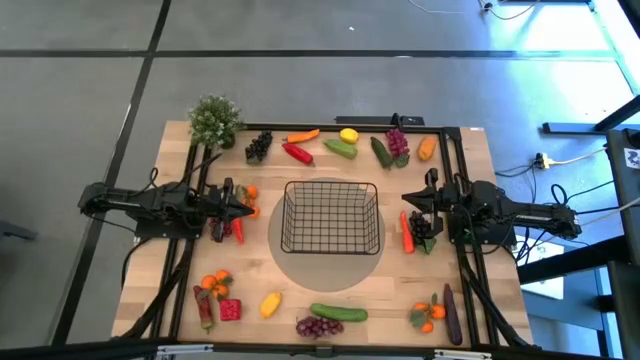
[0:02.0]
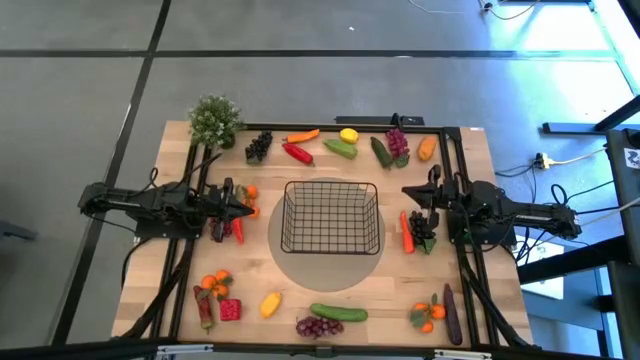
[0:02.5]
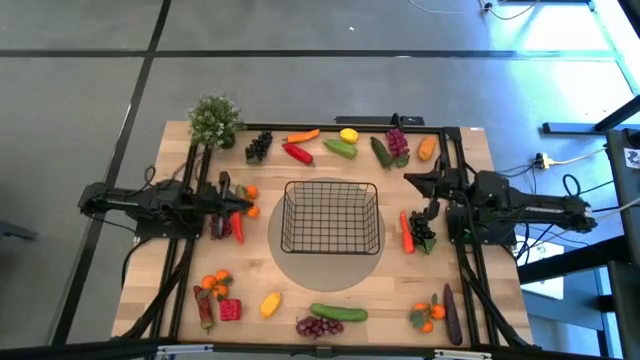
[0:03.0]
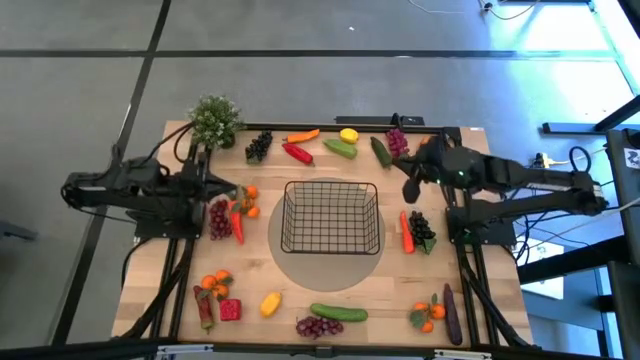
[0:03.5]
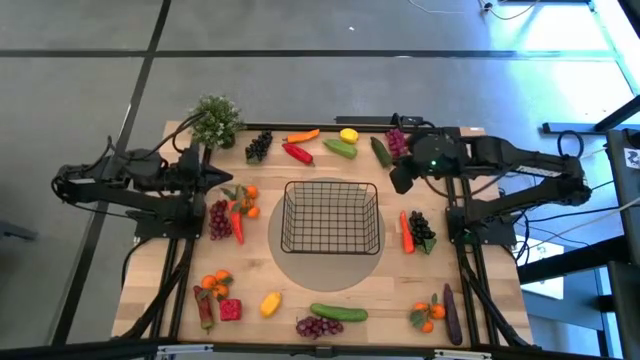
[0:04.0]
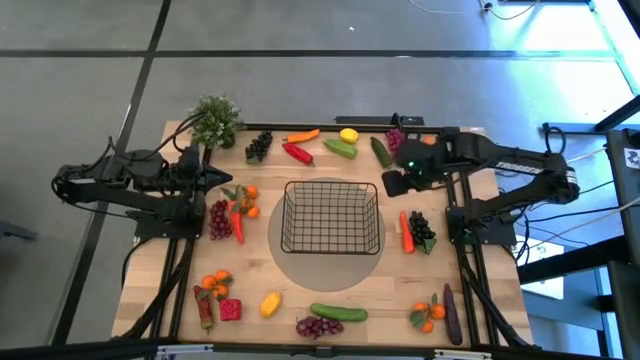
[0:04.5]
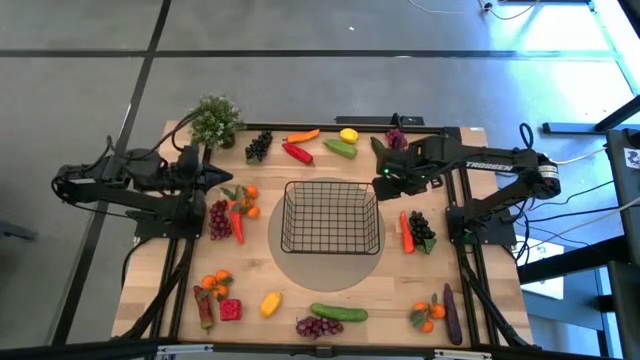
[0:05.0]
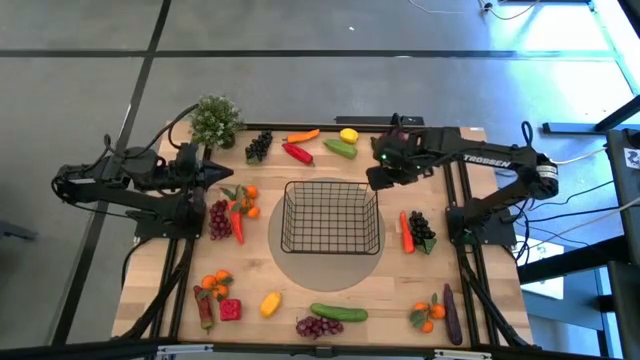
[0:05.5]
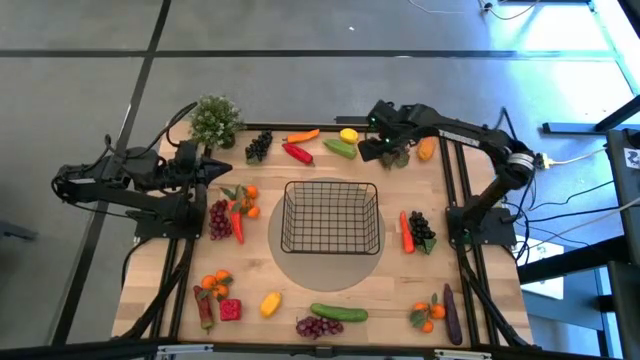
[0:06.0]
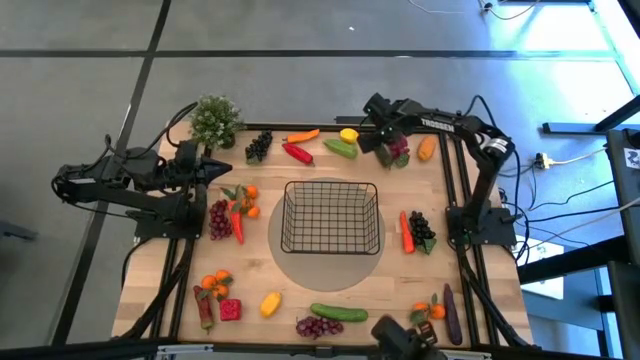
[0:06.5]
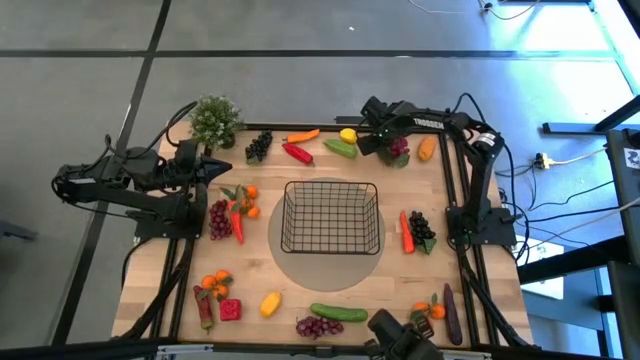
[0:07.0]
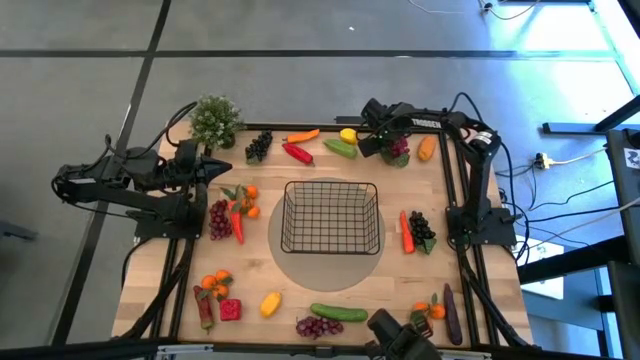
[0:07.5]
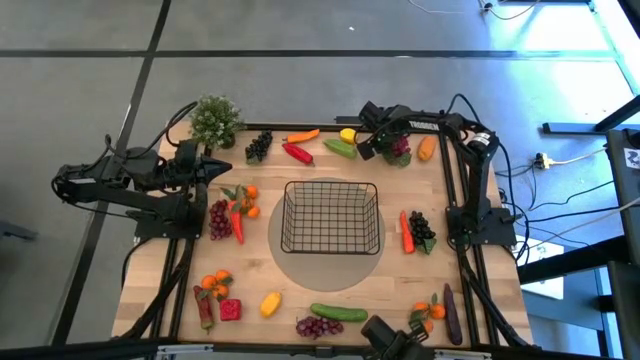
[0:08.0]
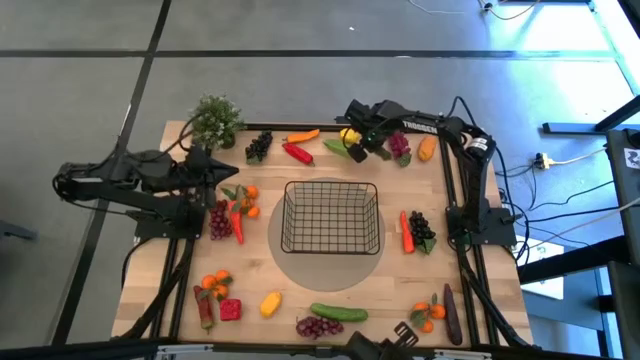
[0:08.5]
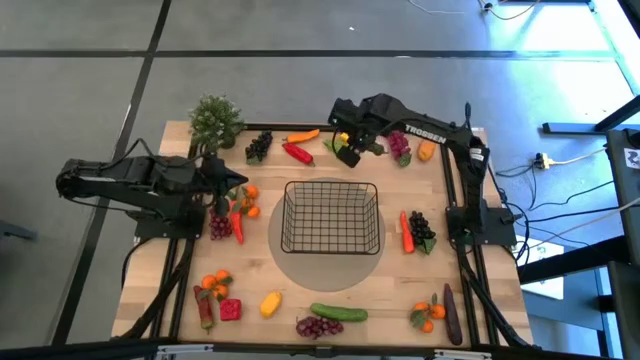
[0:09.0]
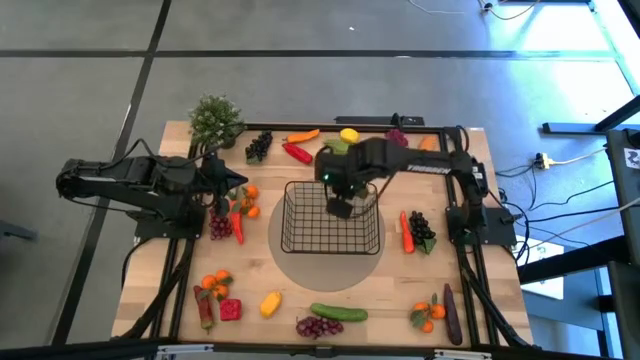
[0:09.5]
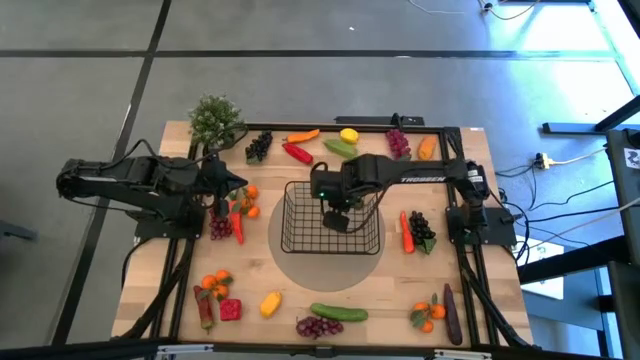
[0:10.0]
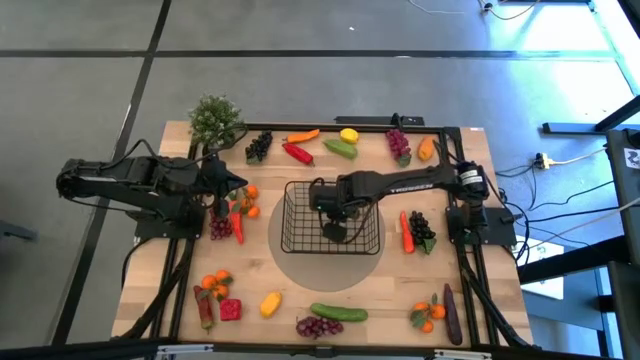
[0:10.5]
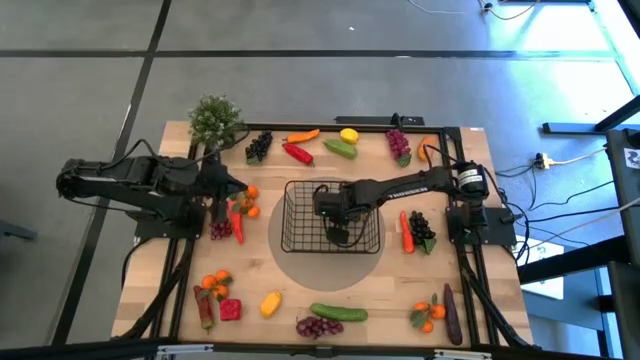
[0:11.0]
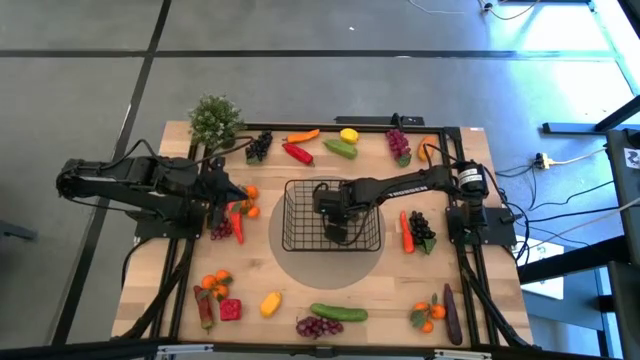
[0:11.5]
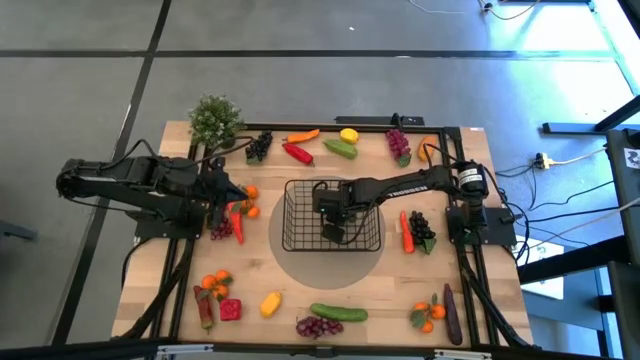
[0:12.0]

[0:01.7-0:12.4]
Task: Build produce basket
Put the top right green bell pepper into the basket

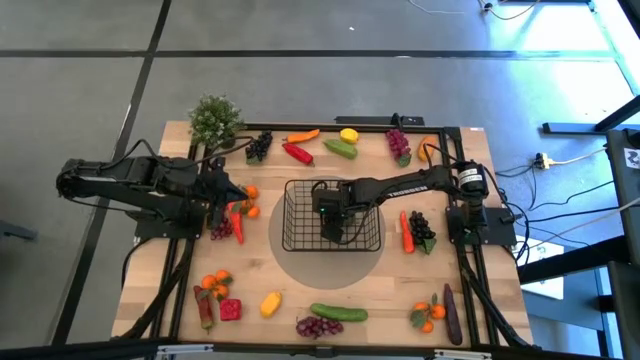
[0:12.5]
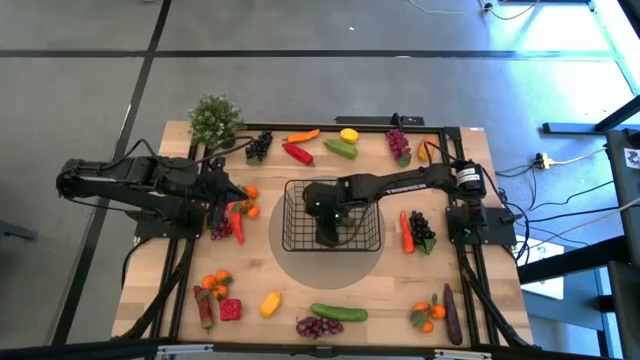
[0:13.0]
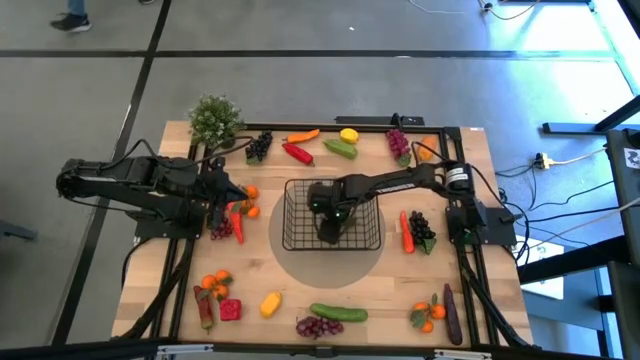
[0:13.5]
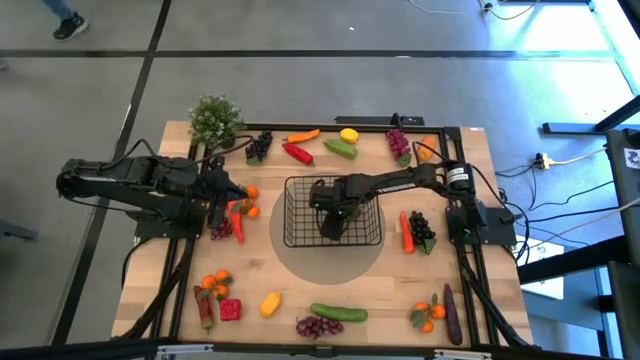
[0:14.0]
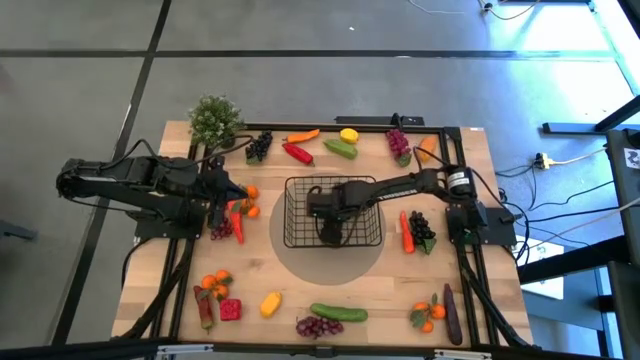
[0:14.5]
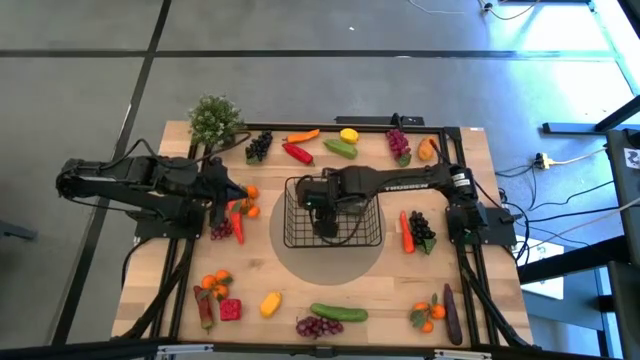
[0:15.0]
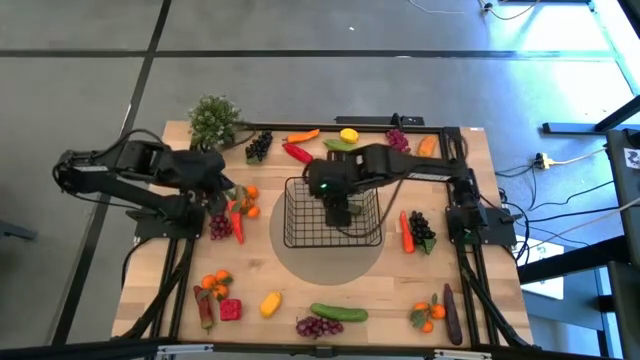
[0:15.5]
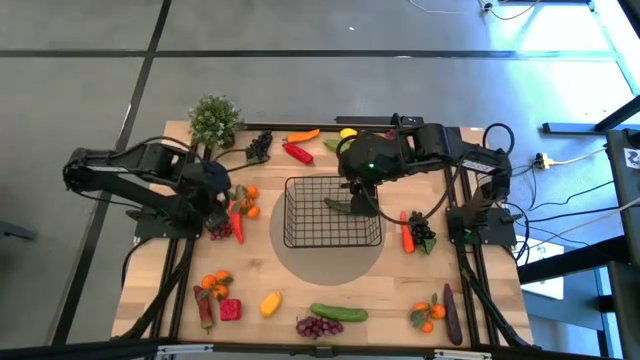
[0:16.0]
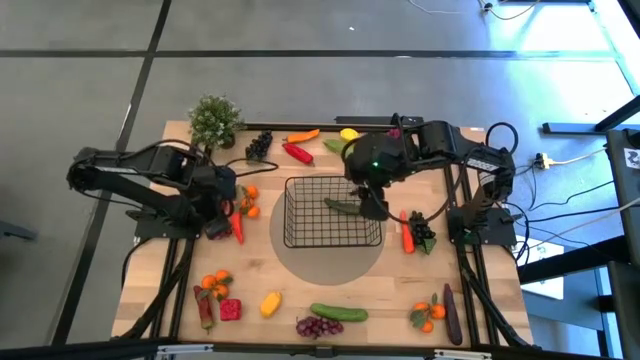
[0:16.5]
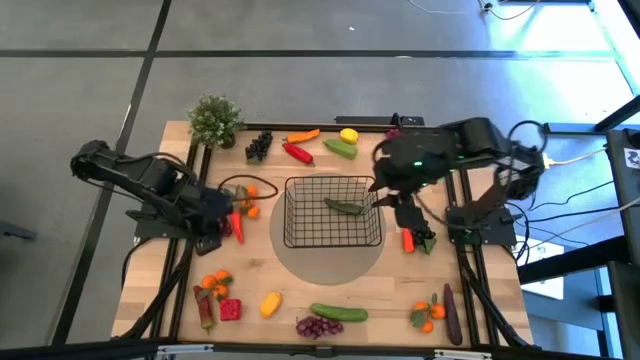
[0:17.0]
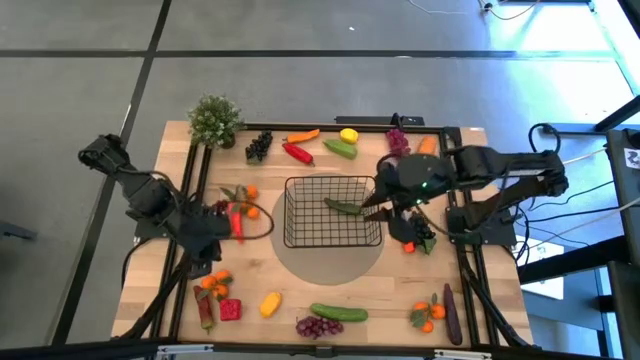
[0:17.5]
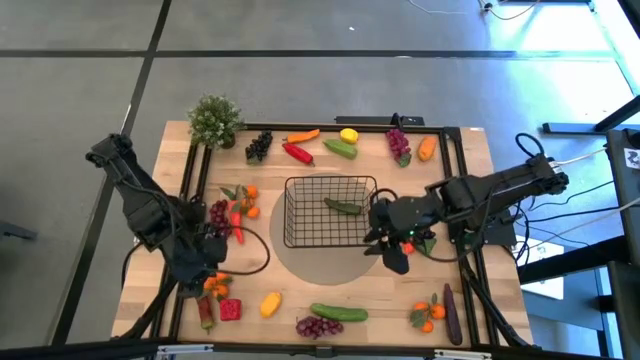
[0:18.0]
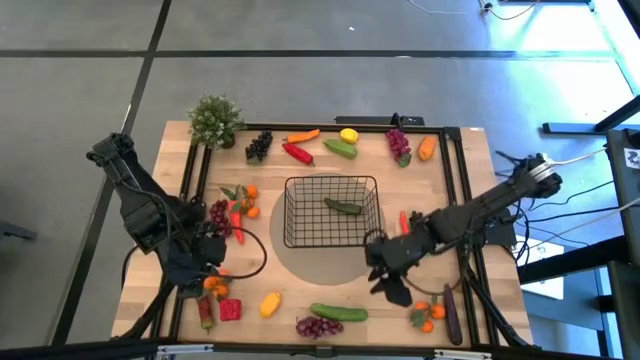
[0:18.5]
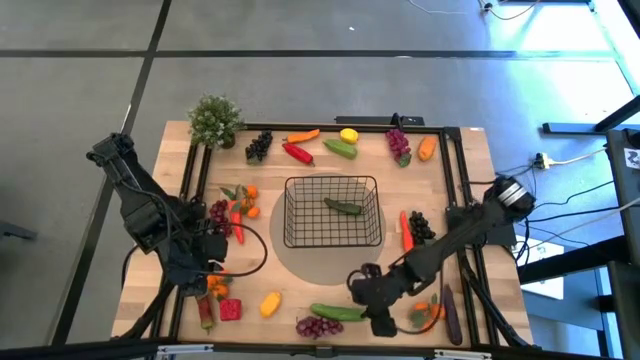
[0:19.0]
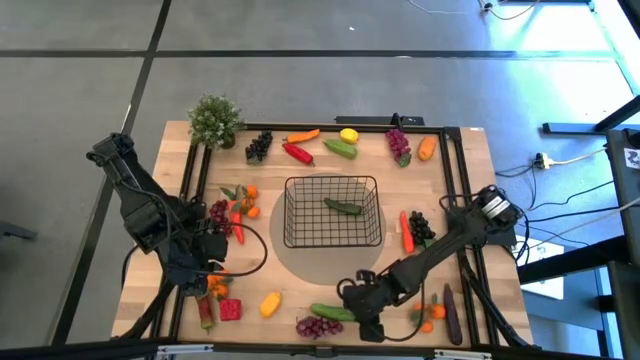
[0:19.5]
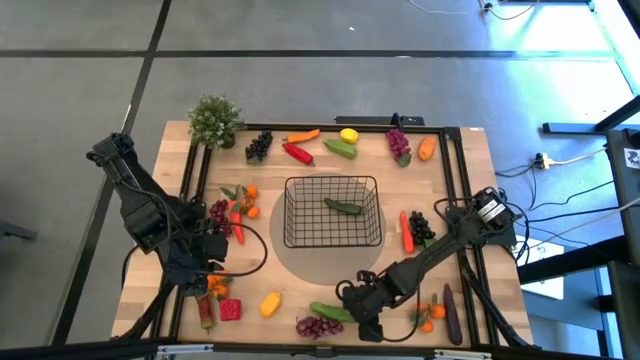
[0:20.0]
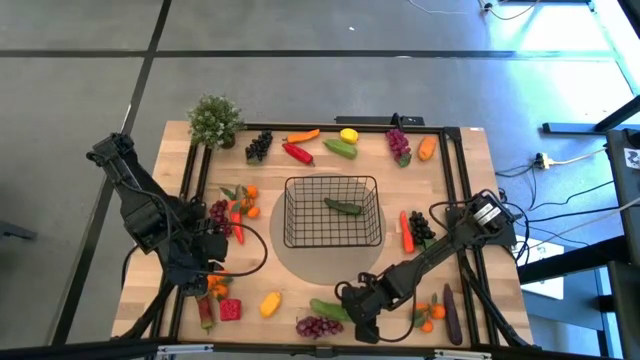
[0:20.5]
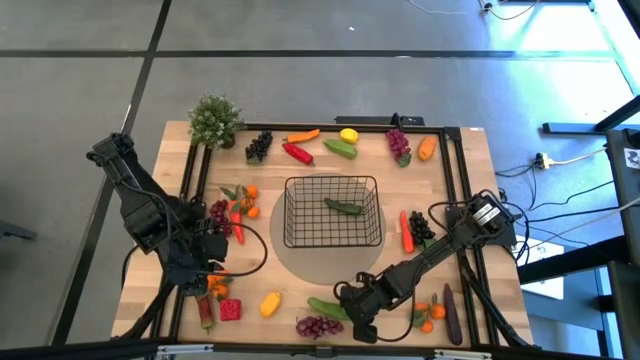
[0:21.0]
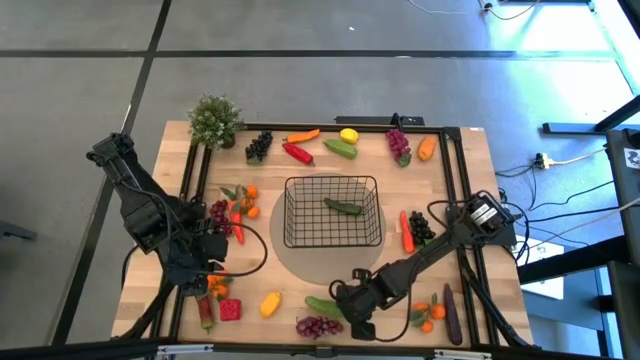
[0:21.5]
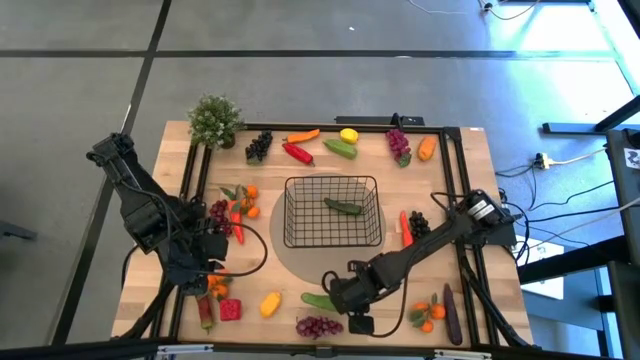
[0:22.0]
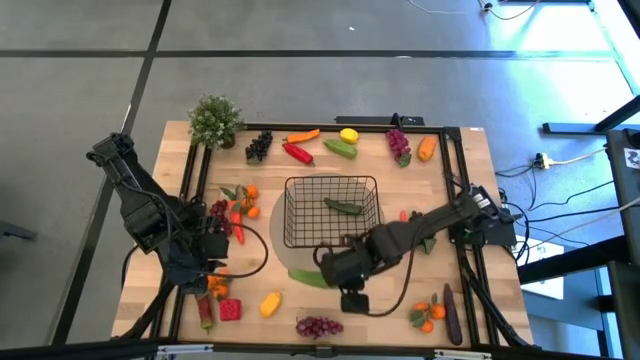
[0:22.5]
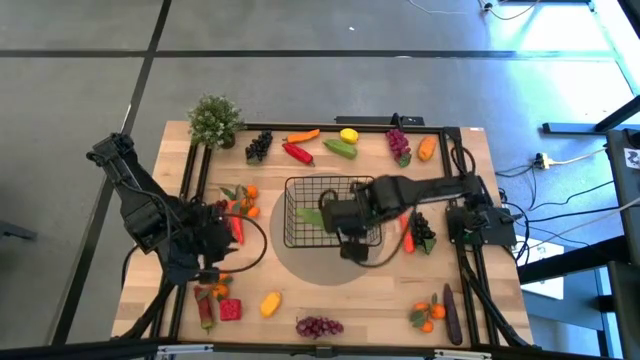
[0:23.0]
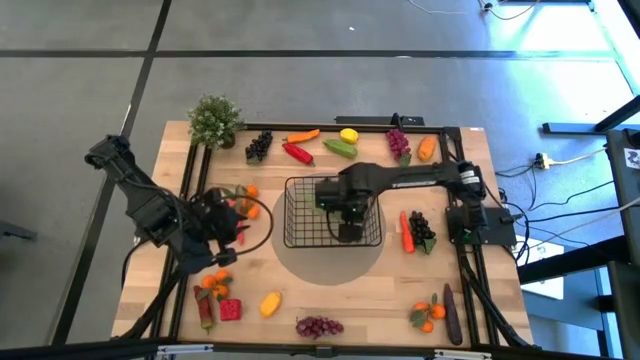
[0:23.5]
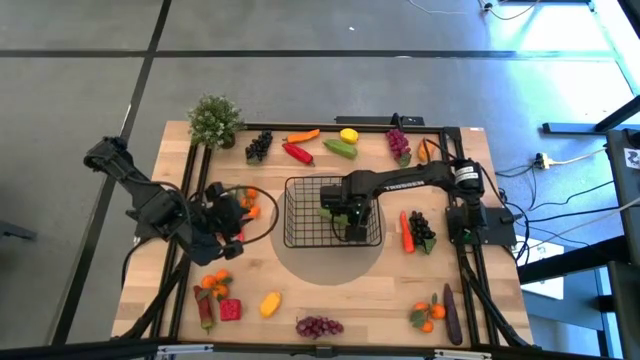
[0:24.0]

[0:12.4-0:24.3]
Put the bottom cucumber into the basket
